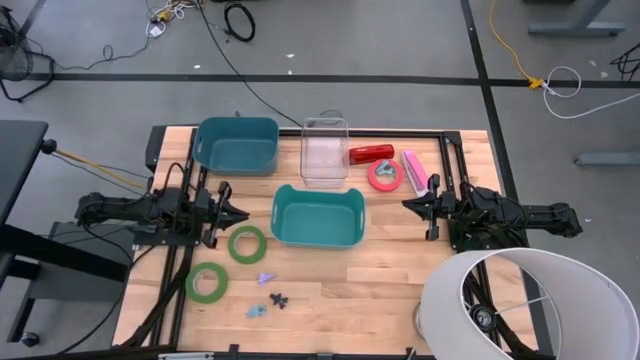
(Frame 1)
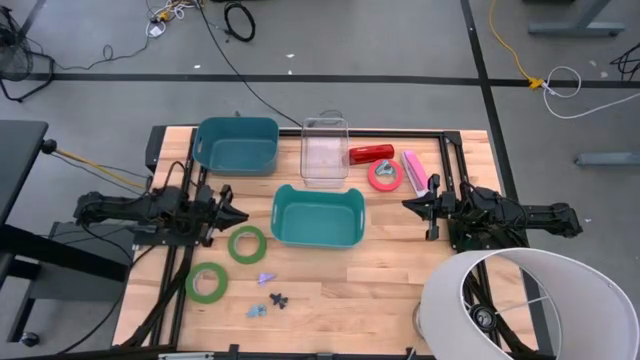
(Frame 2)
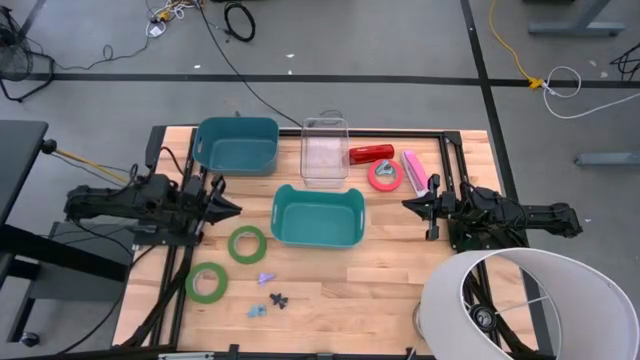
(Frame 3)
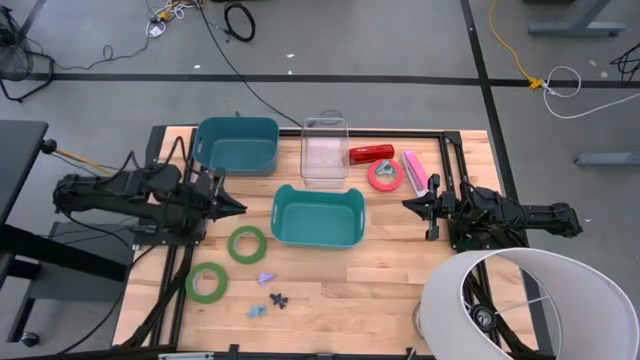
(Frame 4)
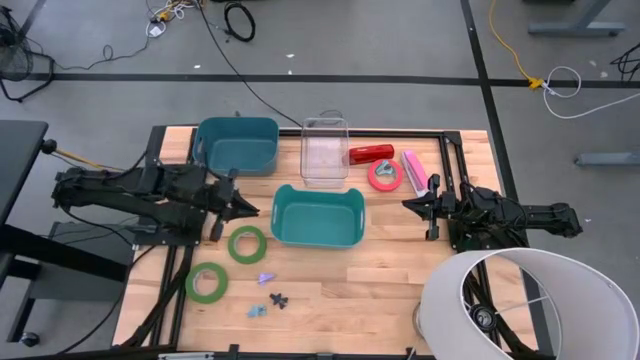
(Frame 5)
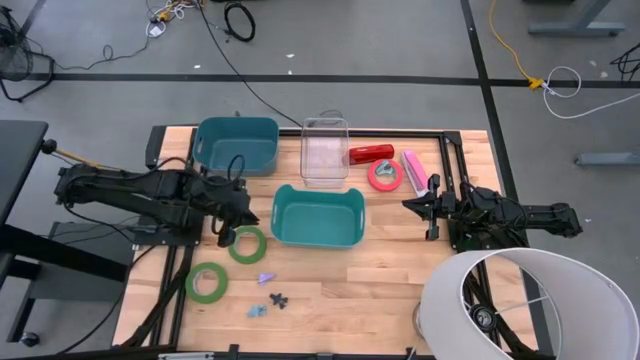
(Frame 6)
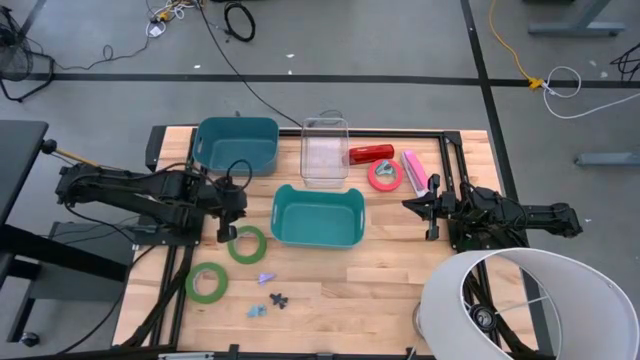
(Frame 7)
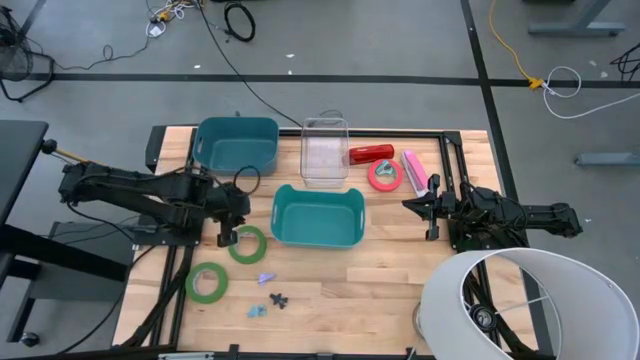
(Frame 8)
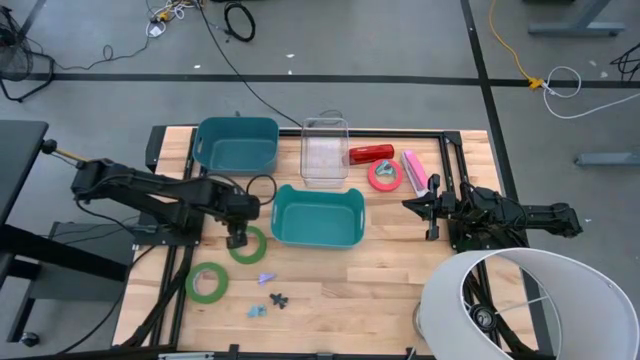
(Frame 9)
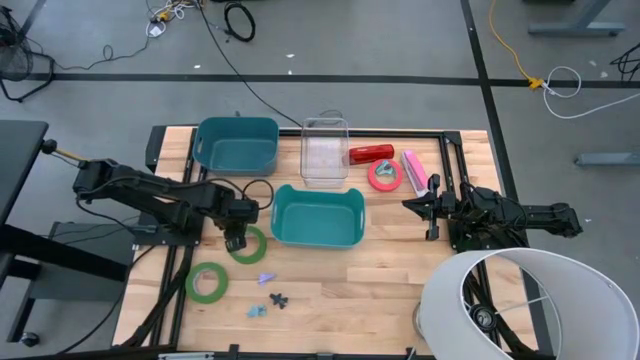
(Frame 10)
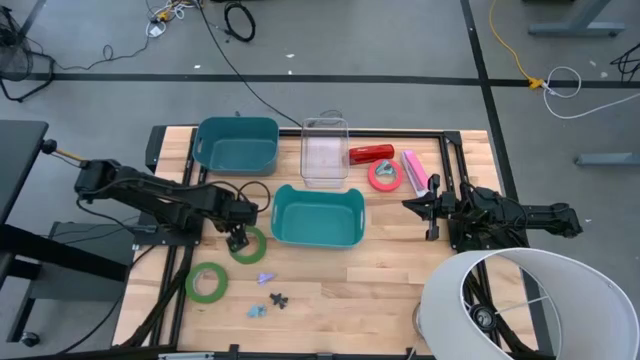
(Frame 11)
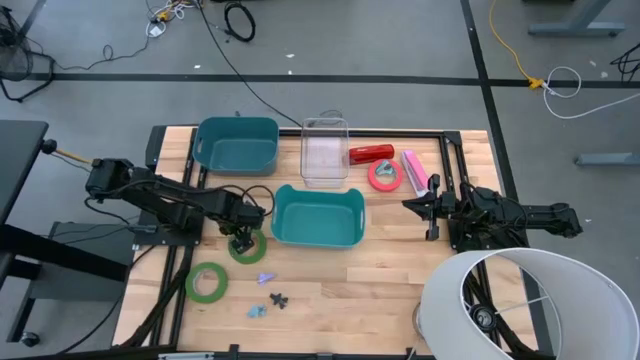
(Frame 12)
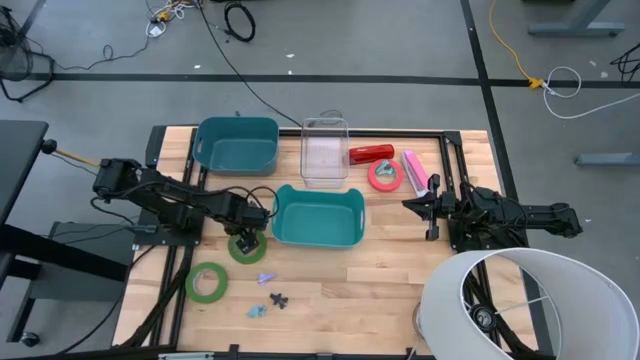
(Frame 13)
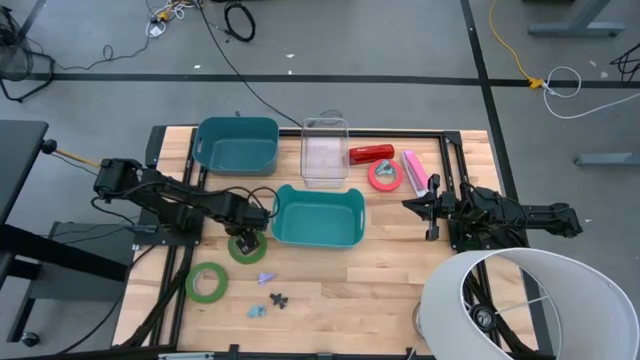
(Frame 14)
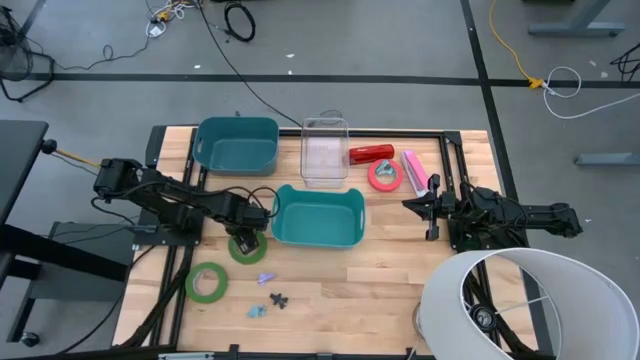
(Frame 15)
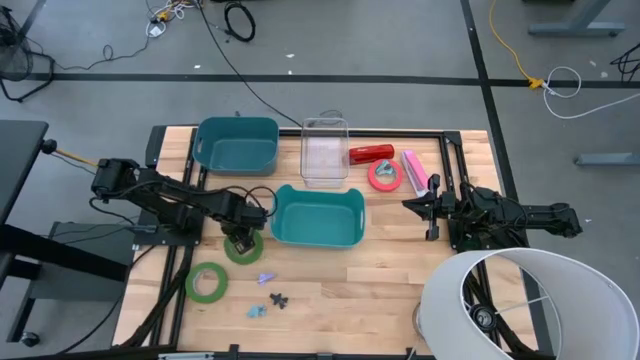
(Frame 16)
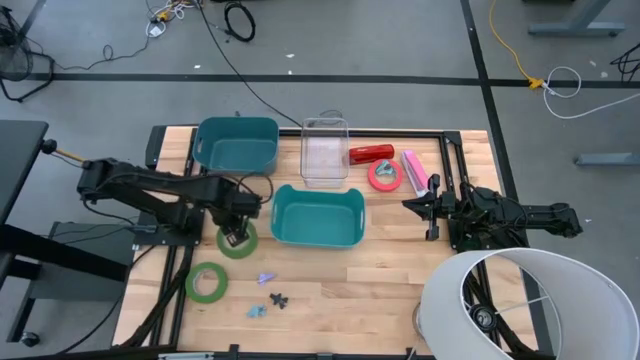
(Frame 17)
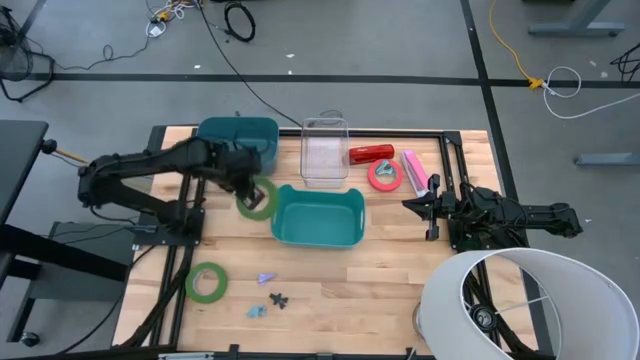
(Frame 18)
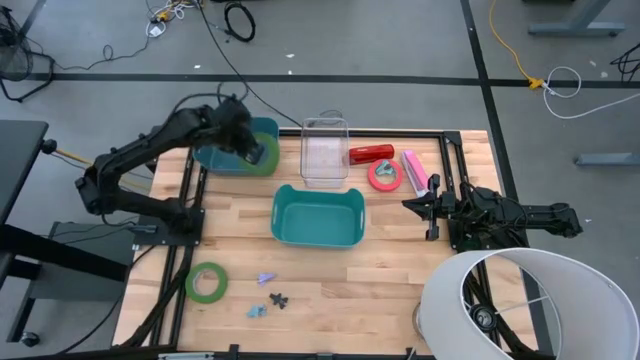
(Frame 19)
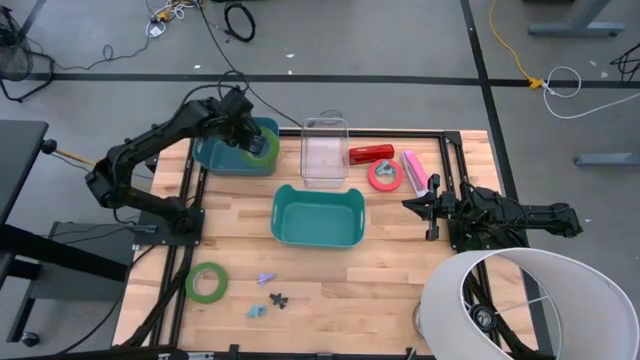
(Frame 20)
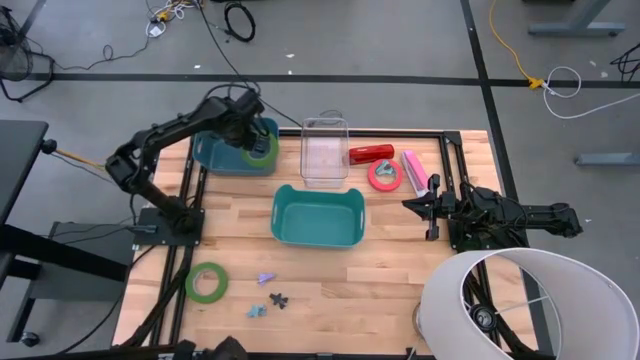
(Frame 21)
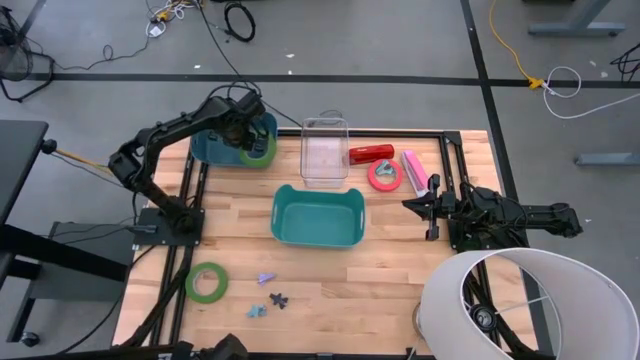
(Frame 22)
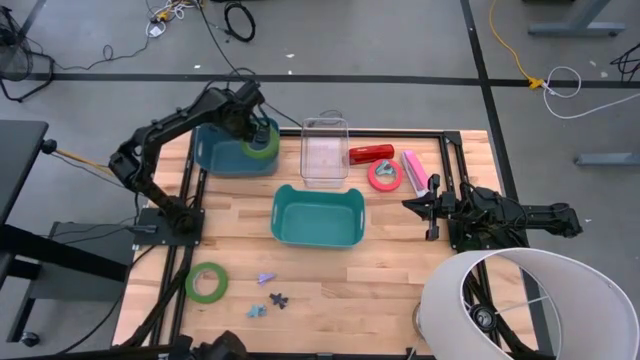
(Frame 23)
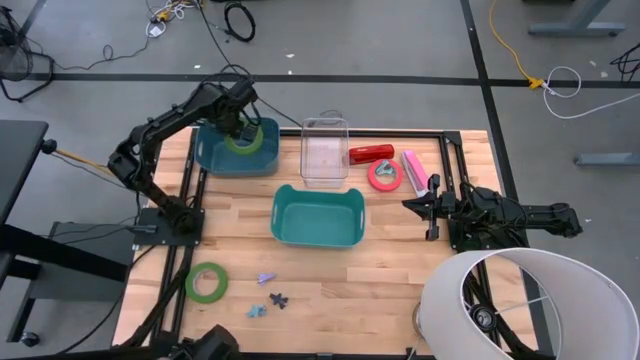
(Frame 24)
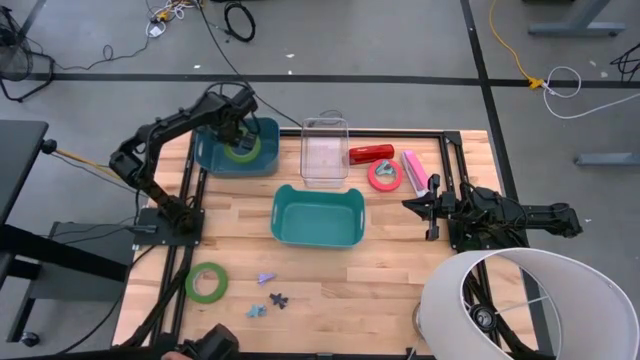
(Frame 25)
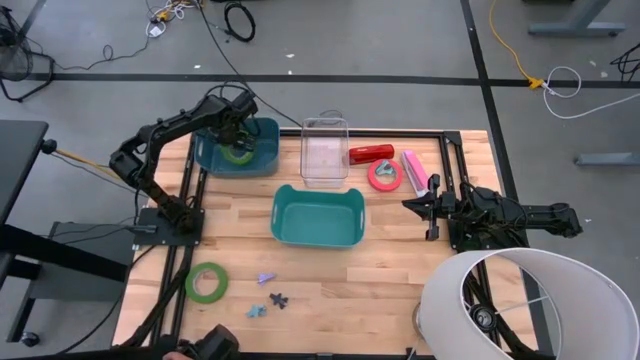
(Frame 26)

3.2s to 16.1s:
Task: Pick and place Stapler, Stapler remover, tape
Put the top green tape into the blue bin
